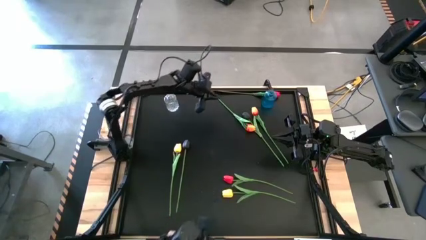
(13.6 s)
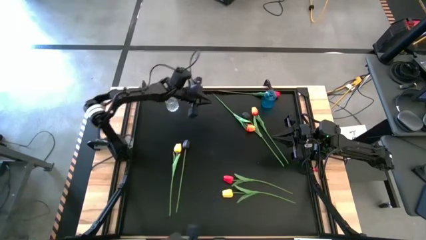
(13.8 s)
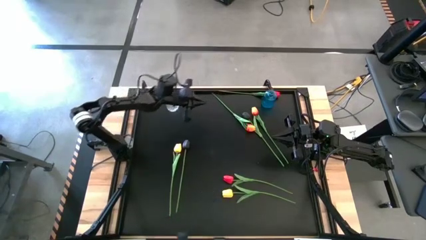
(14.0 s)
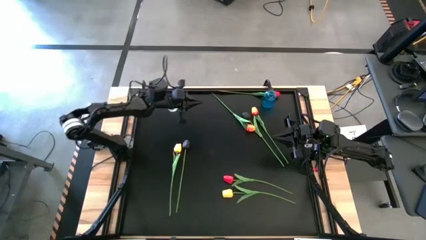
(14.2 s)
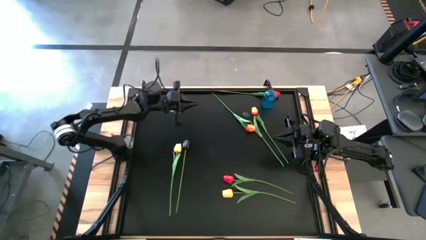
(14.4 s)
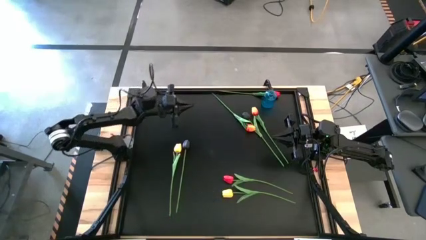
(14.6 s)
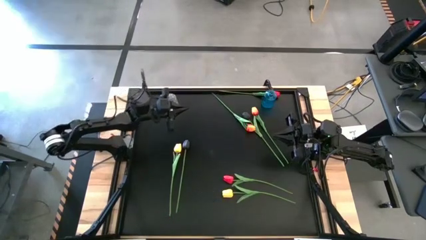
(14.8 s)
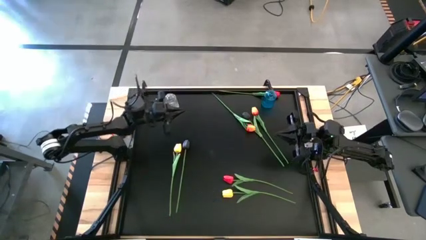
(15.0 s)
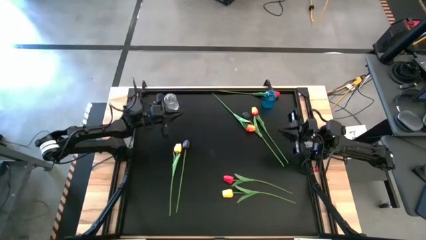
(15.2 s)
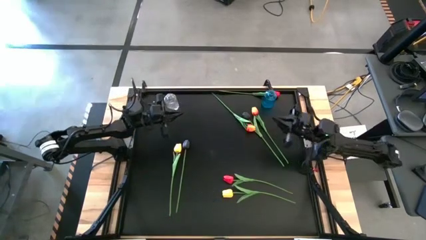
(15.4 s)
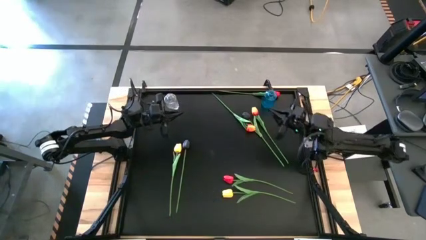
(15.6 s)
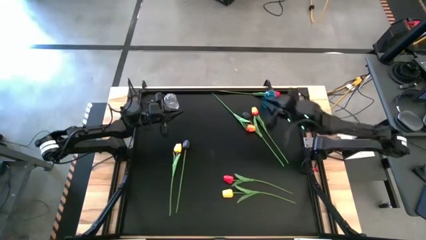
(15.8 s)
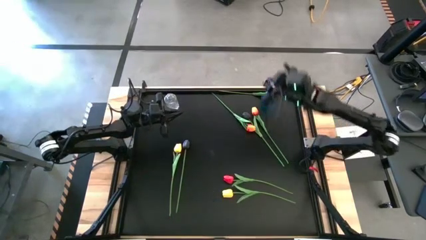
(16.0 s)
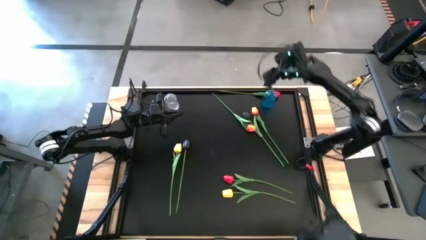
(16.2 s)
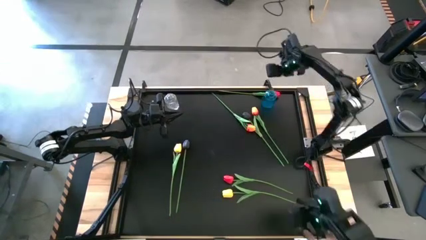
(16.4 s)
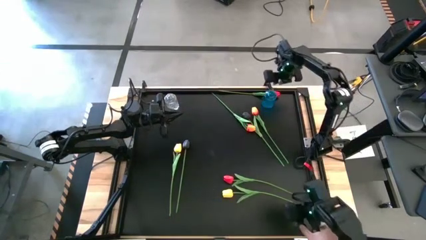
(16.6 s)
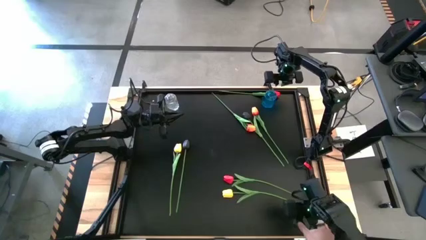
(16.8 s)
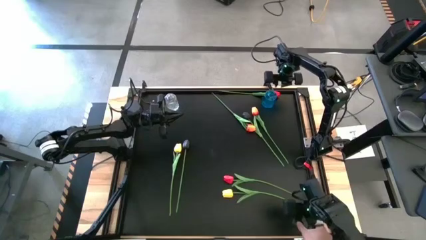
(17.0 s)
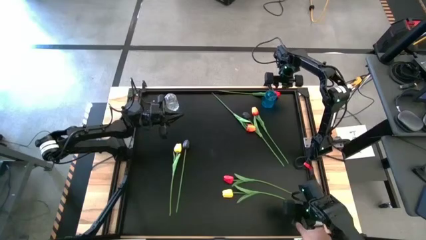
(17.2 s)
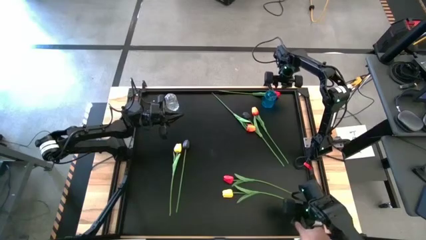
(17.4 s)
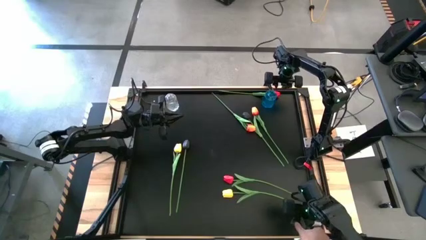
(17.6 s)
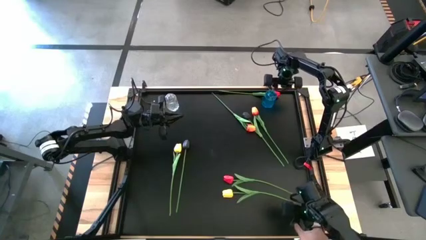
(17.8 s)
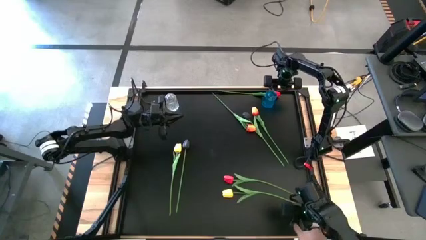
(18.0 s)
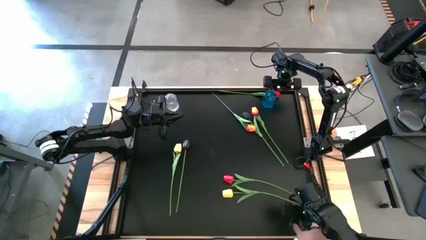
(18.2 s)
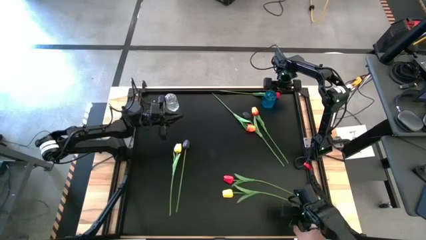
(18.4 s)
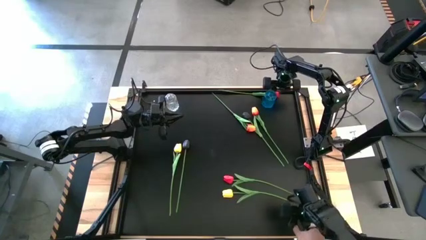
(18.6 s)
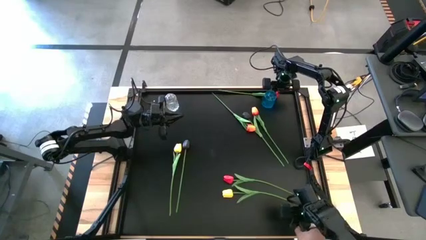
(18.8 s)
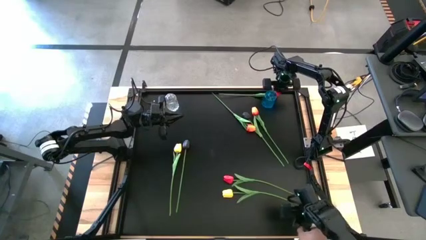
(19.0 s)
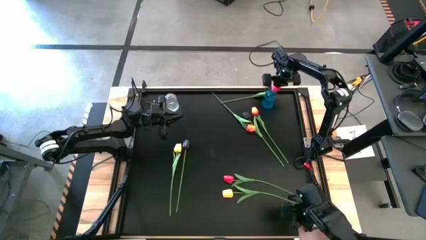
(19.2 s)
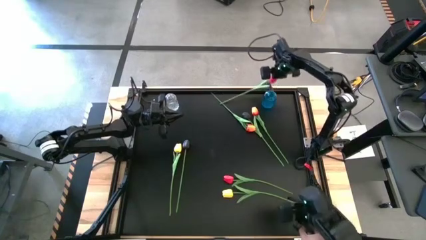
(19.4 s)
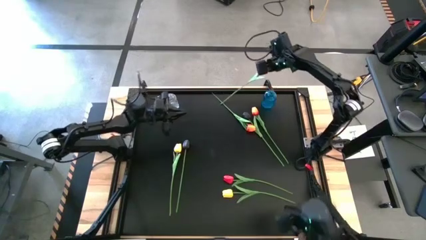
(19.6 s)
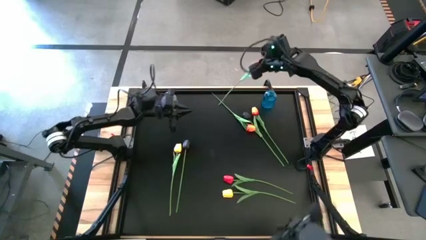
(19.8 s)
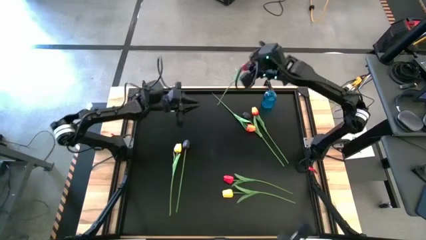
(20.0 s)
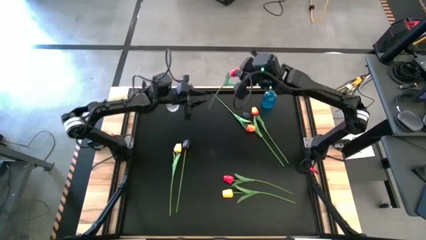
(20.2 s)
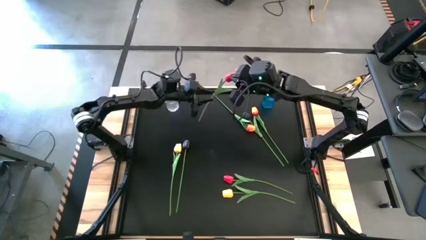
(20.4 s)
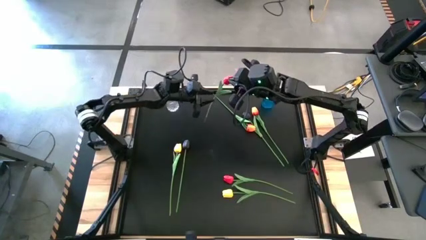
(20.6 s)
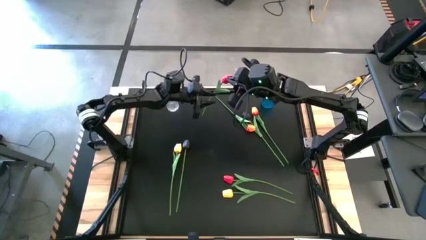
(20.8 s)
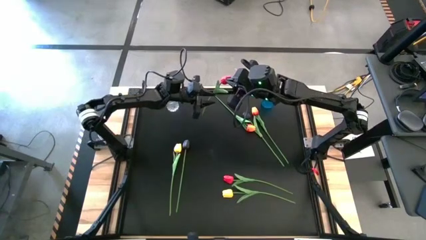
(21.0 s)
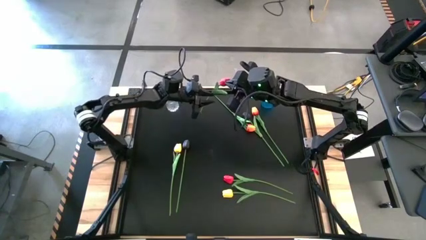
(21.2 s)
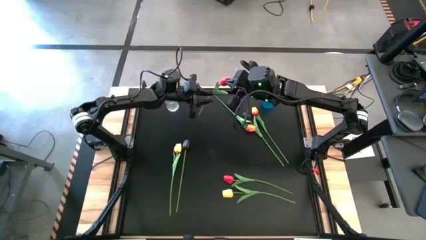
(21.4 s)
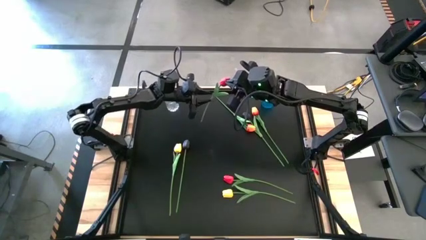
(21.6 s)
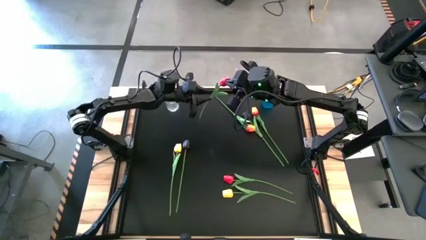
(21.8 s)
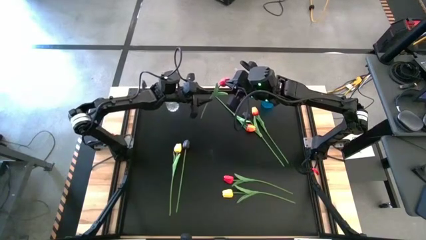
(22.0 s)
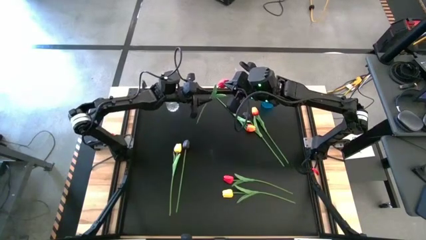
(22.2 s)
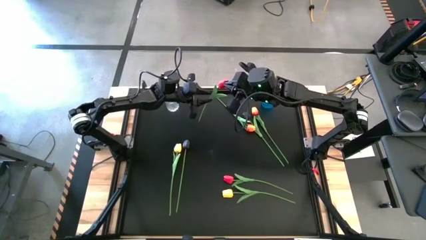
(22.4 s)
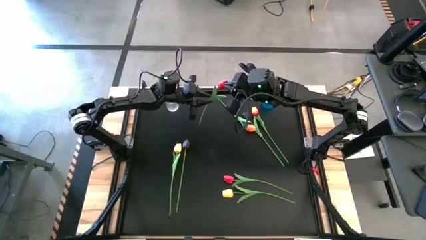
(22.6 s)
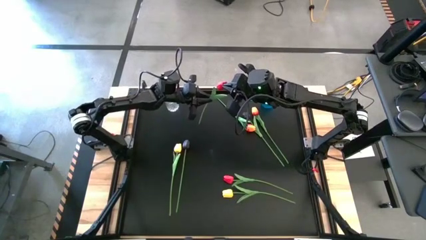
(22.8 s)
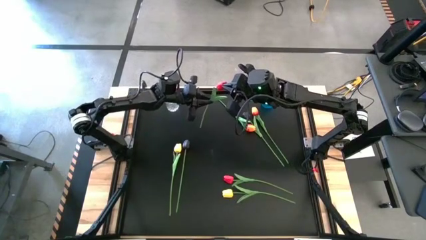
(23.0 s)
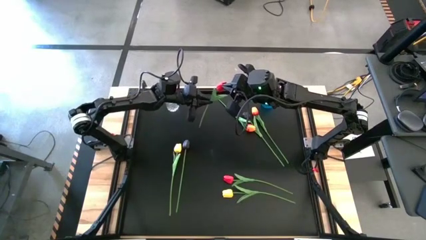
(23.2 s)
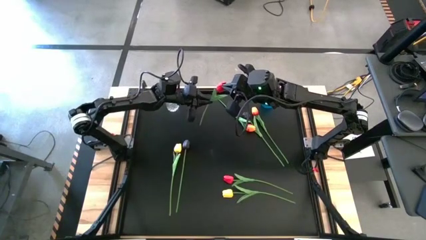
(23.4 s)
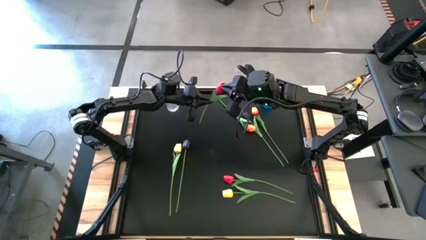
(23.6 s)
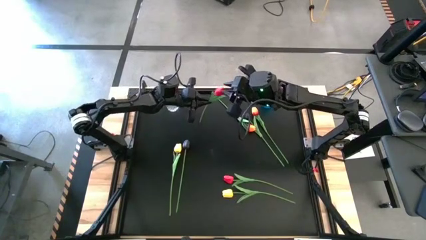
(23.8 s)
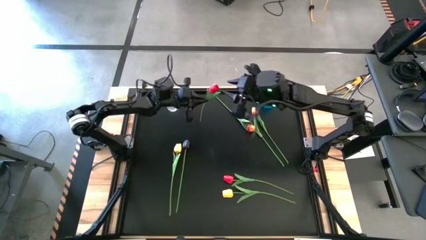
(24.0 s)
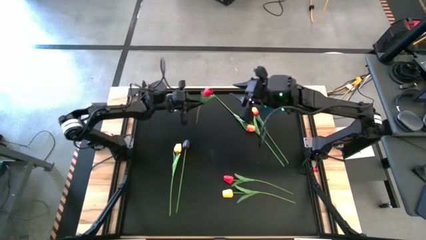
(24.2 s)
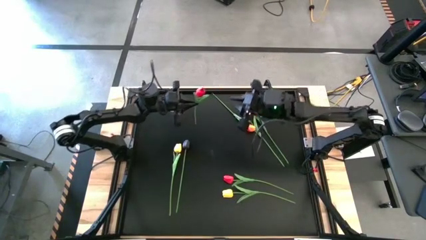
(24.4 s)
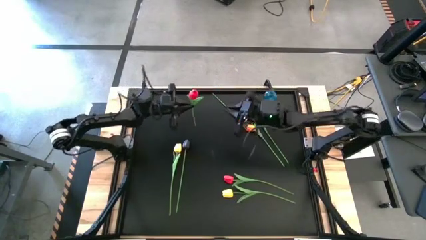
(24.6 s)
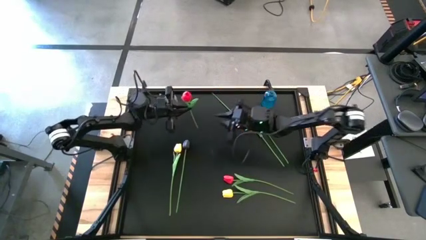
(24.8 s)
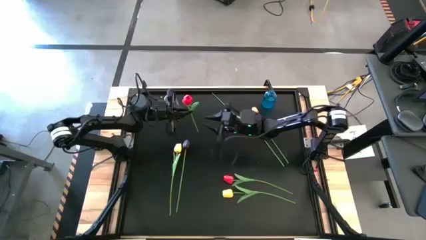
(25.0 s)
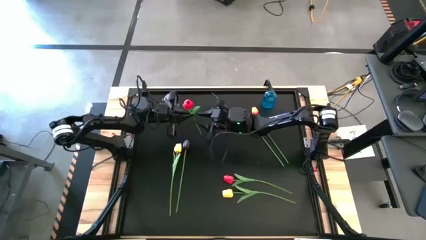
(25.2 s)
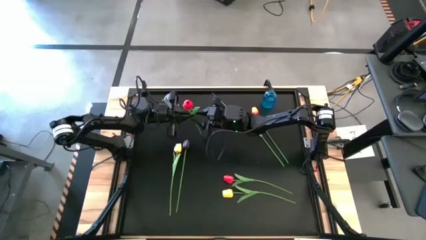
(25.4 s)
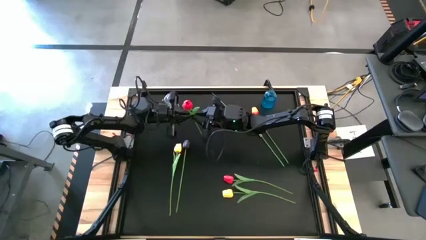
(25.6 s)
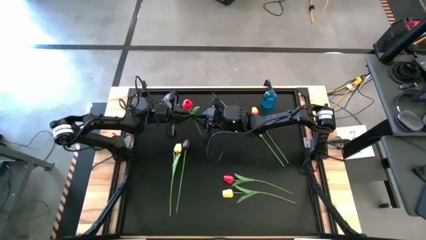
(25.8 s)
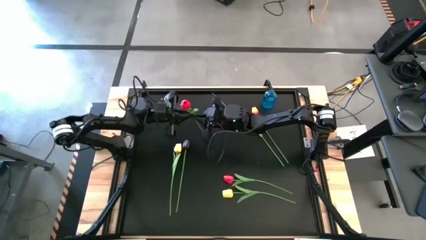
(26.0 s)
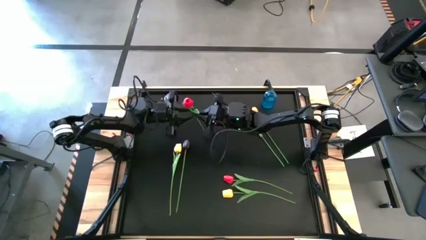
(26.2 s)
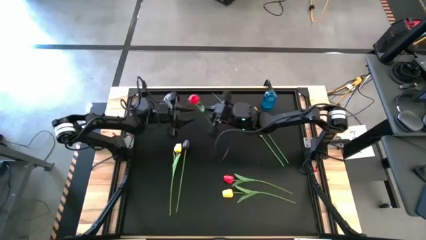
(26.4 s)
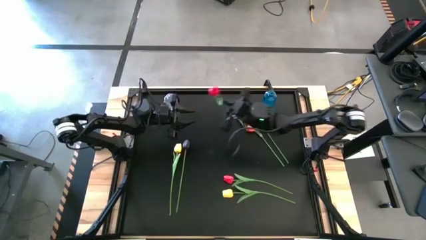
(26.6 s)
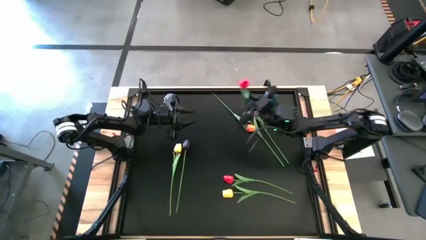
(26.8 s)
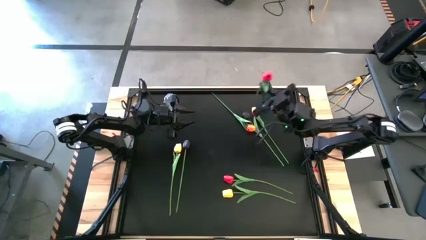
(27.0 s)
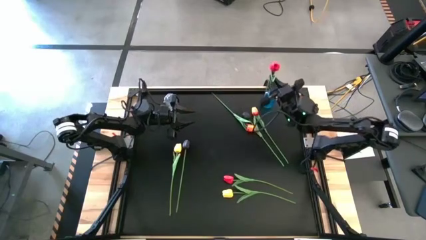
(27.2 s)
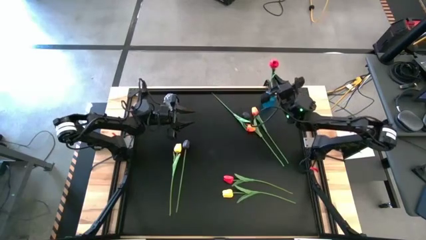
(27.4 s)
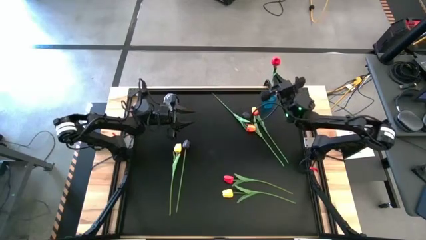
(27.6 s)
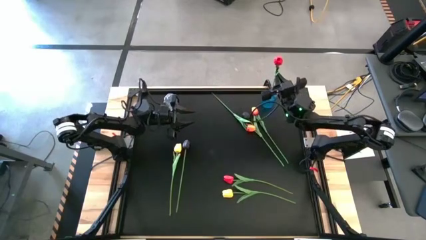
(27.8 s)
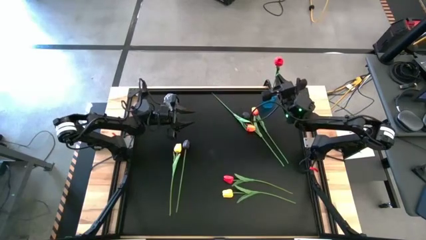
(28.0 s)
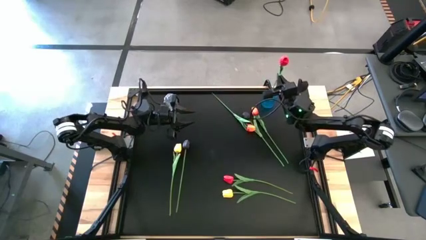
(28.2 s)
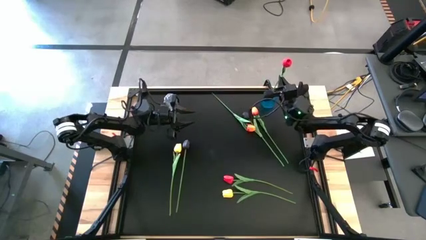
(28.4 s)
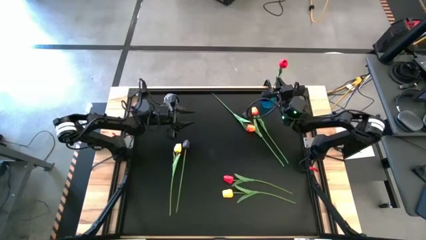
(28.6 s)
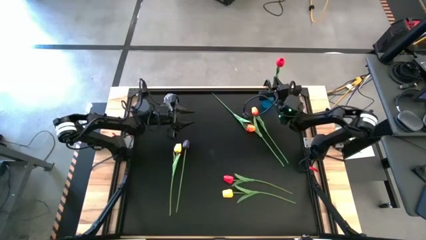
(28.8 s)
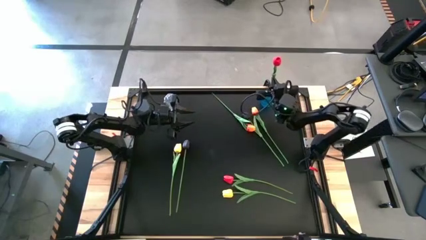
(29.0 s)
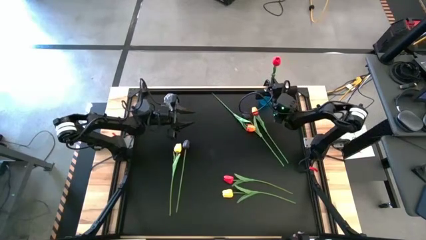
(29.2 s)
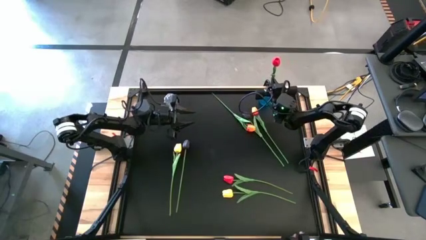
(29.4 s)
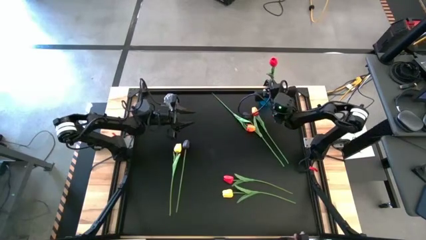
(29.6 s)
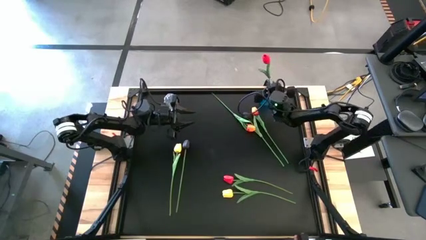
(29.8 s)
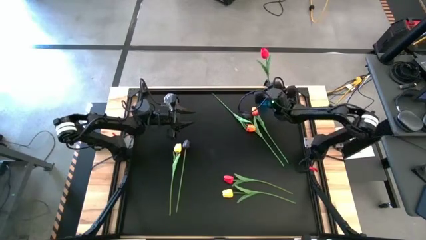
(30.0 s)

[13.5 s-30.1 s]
Task: Sort flowers into vase by color
Put the top red tulip into the blue vase
